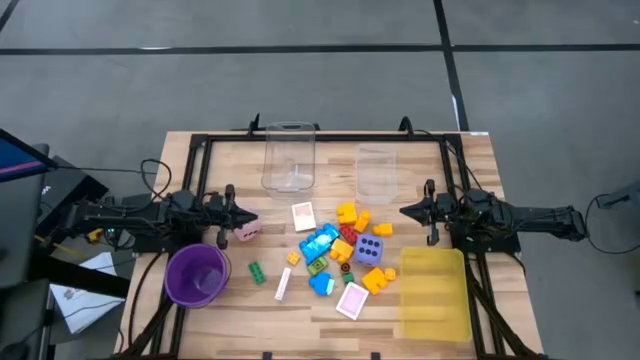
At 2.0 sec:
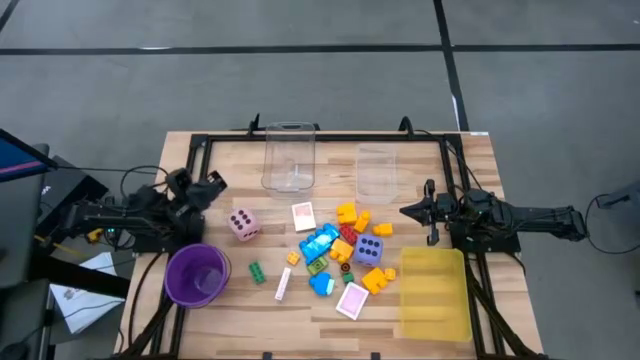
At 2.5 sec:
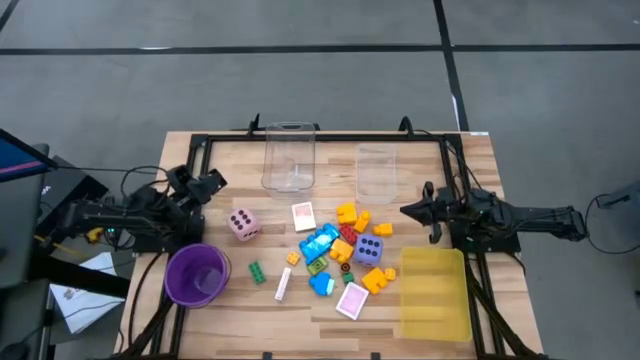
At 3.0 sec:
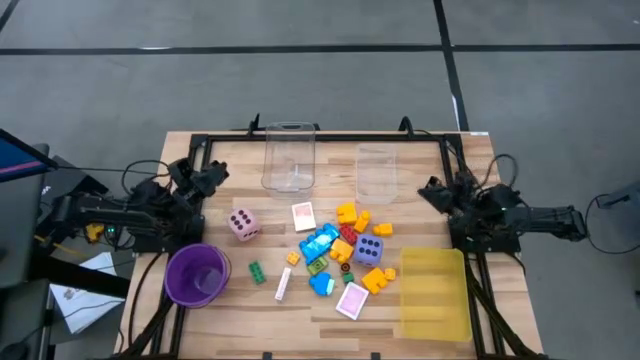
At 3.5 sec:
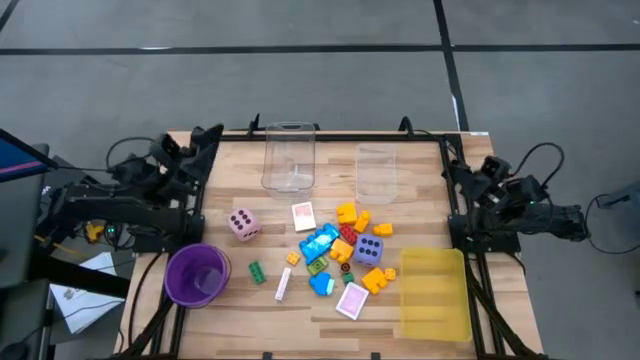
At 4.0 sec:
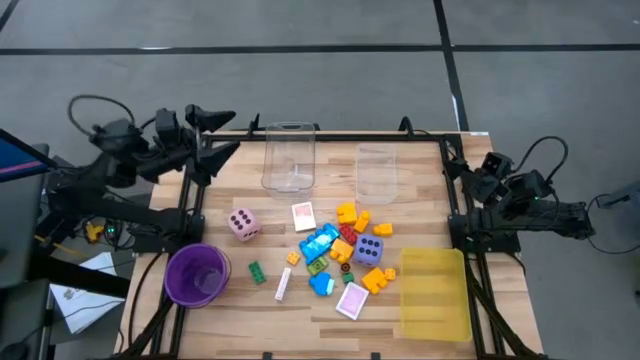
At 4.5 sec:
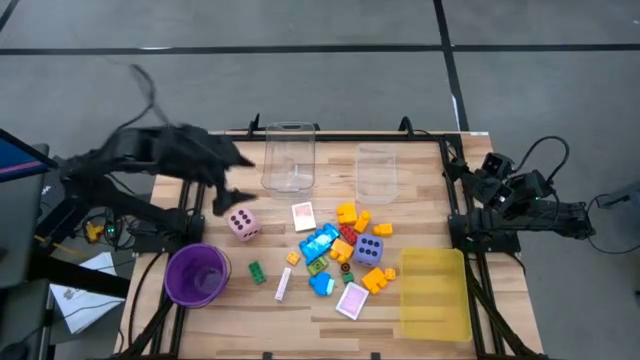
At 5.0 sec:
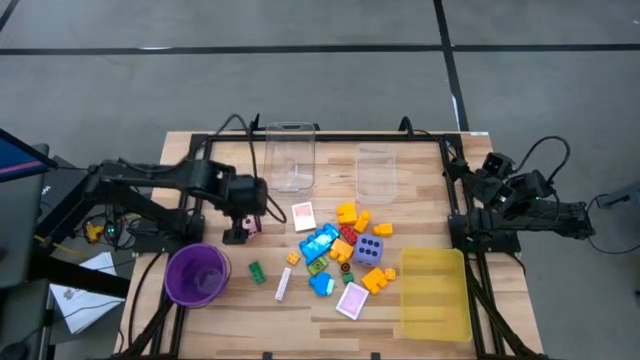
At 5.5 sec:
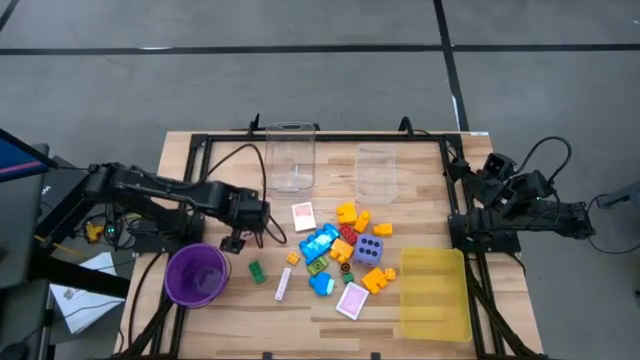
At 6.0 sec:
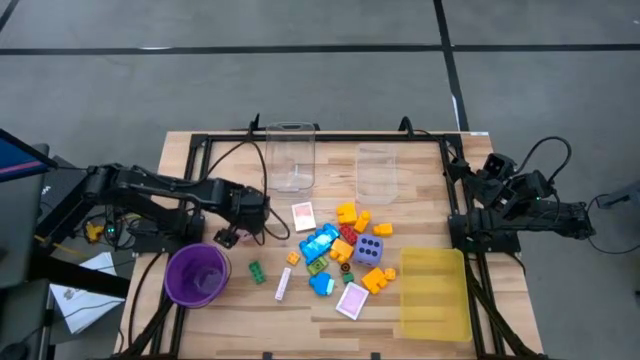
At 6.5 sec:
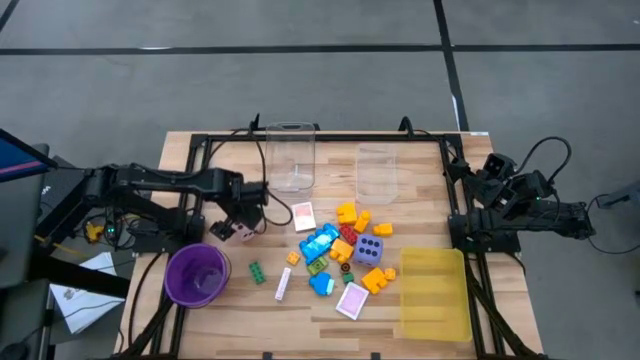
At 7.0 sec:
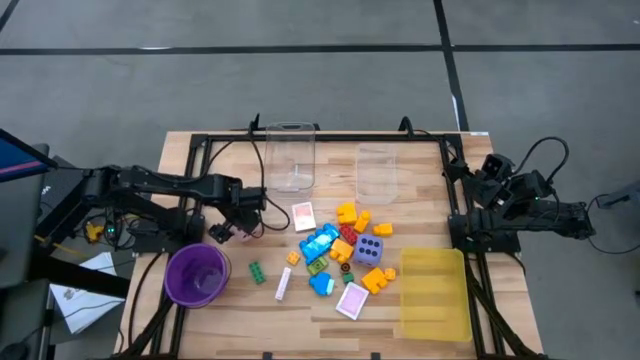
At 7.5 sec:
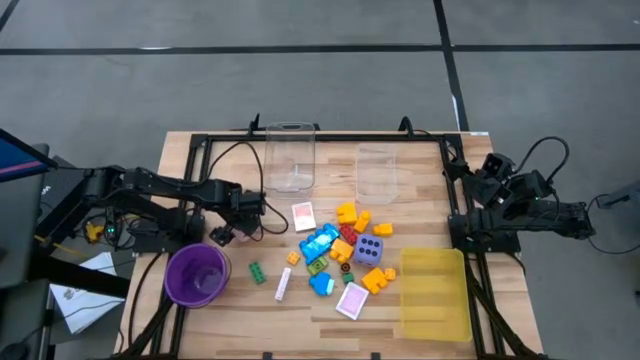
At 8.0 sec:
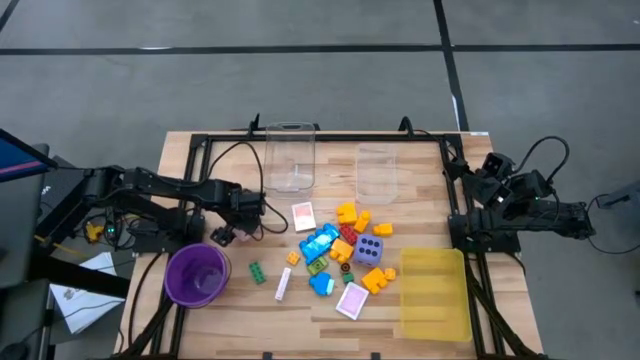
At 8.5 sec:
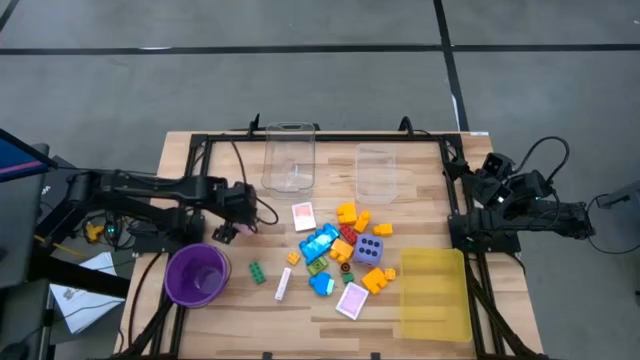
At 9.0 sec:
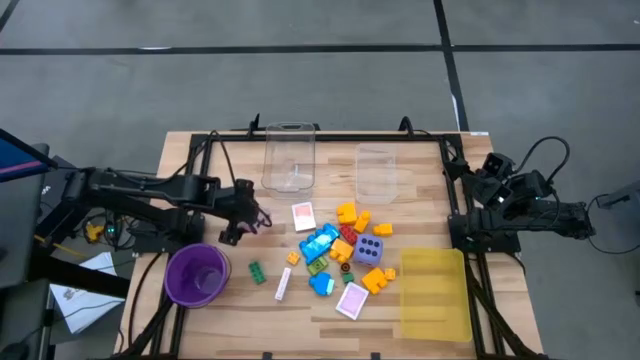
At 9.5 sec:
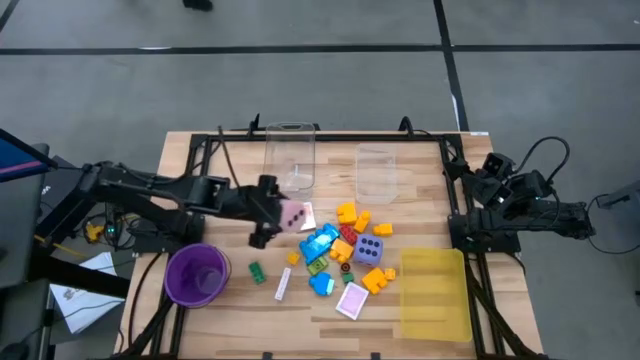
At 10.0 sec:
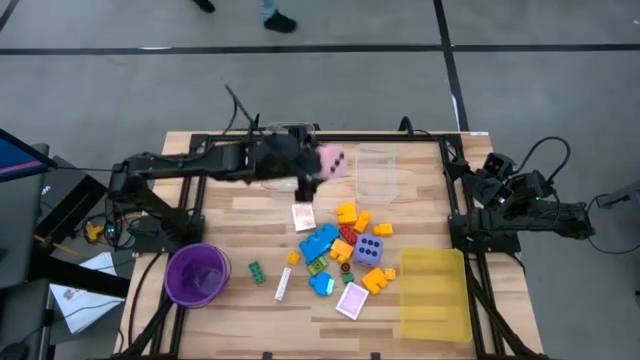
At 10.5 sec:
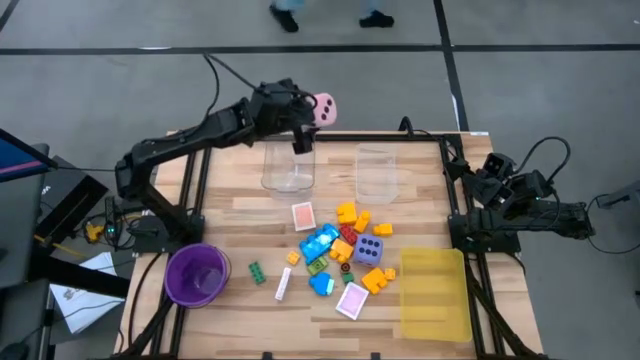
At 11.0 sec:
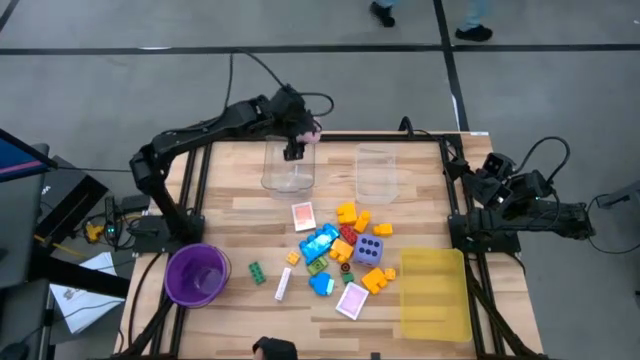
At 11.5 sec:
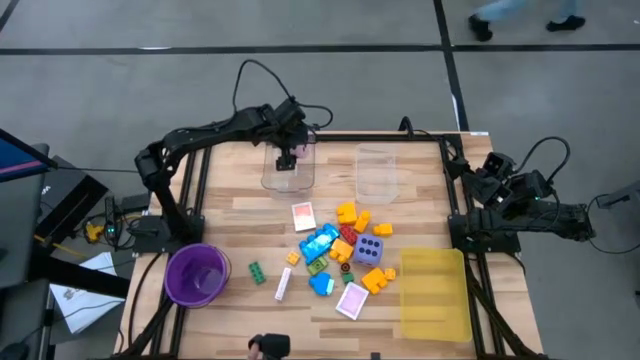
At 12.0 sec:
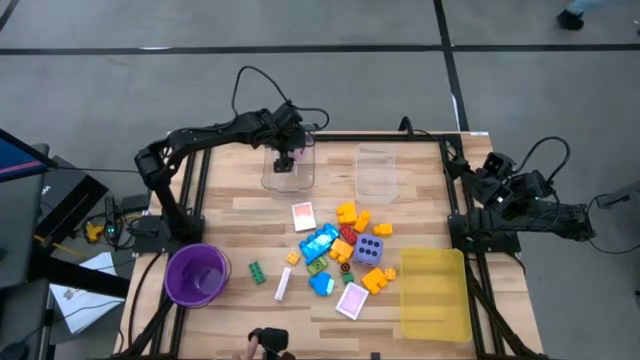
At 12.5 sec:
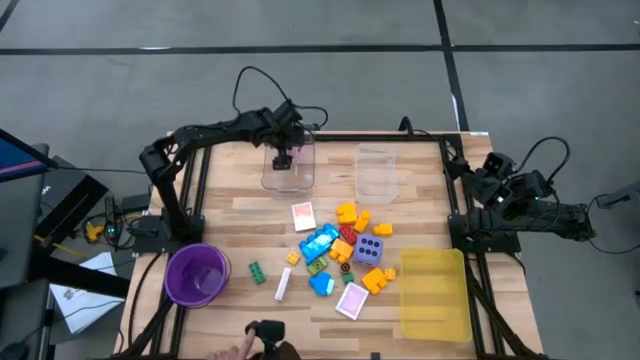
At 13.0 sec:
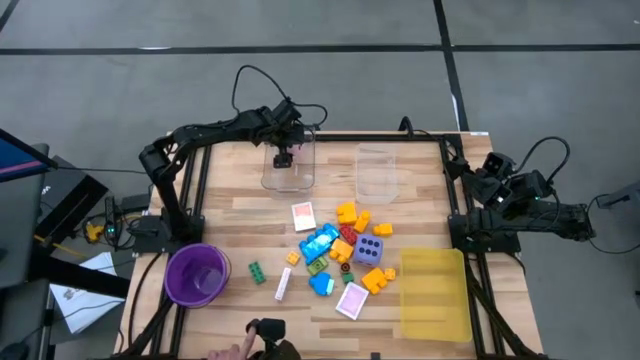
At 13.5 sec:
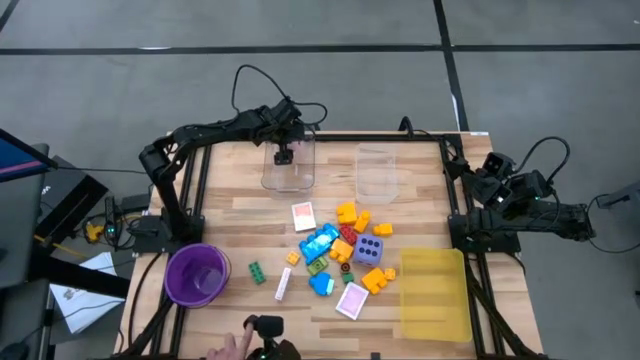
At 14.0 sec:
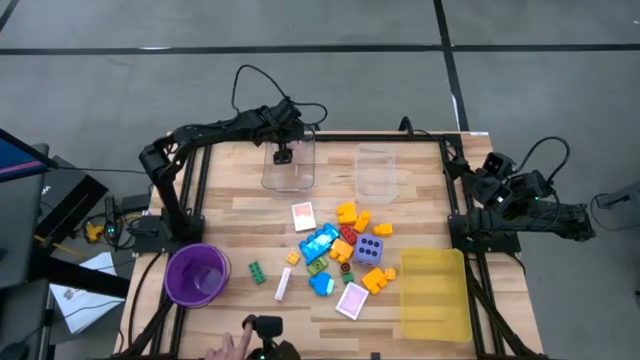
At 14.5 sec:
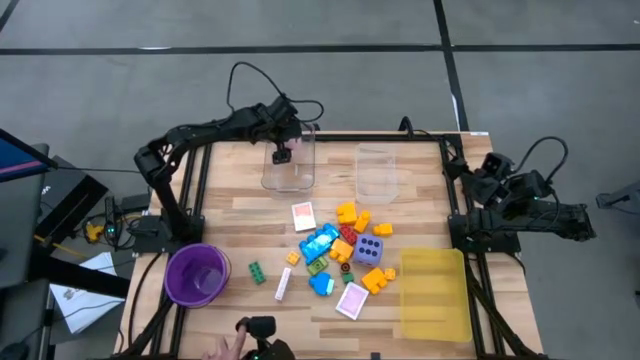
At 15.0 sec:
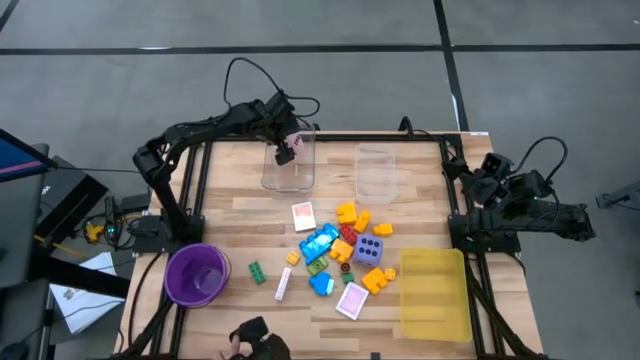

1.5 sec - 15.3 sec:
Task: Pick & Place Toys
Put the pink dice into the left transparent bin
